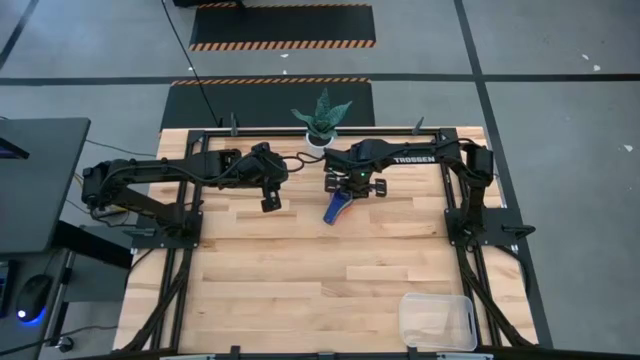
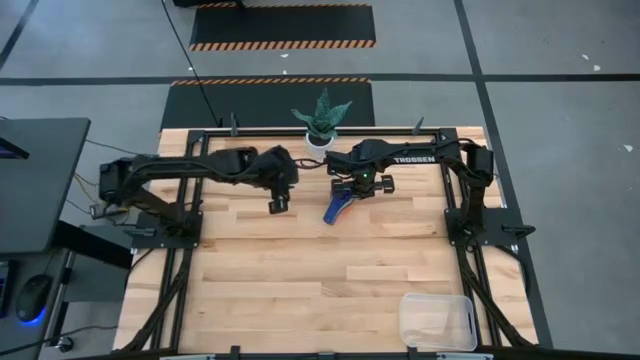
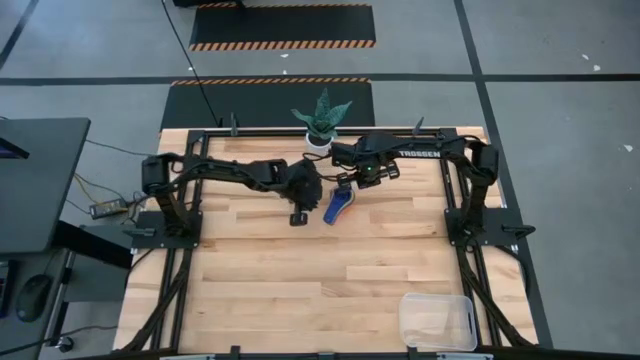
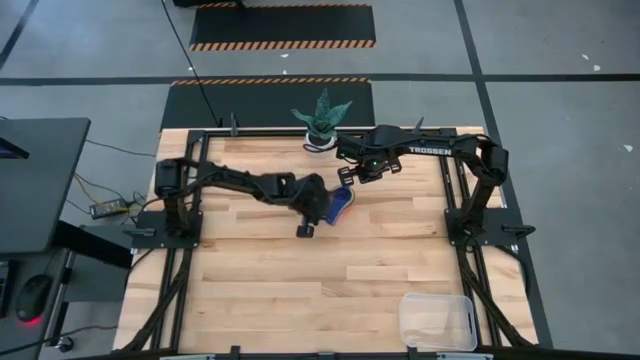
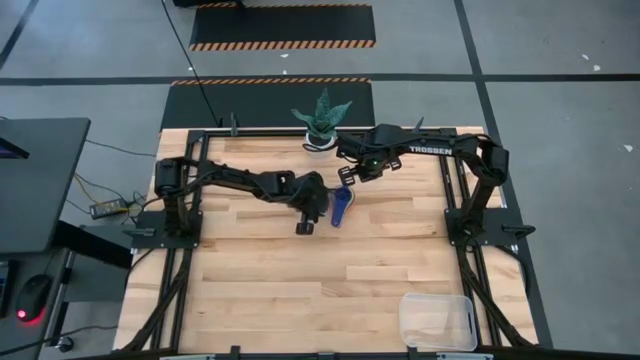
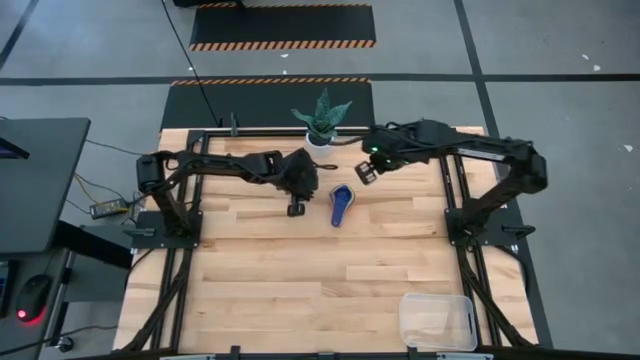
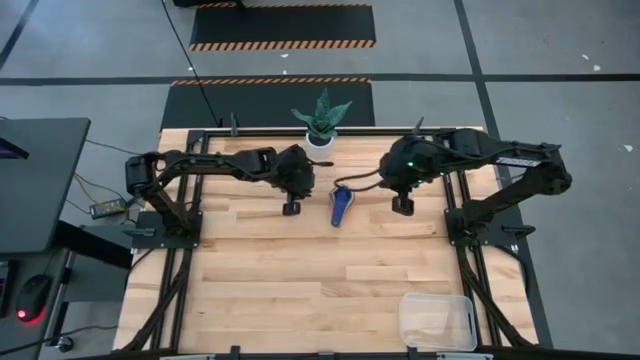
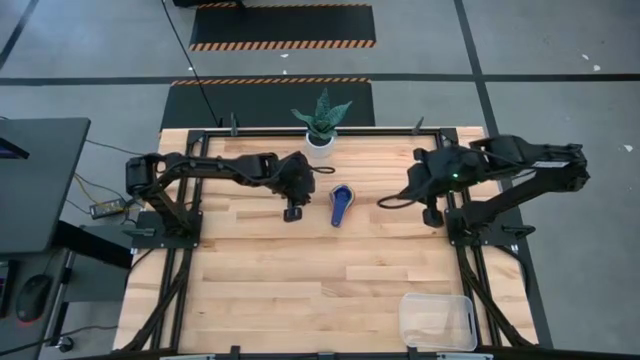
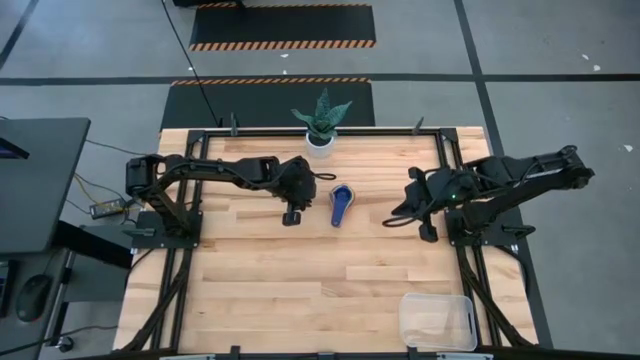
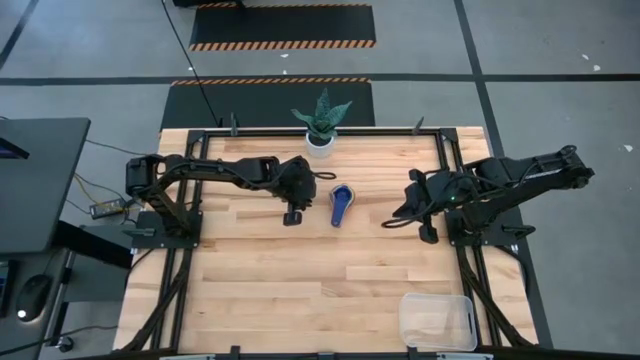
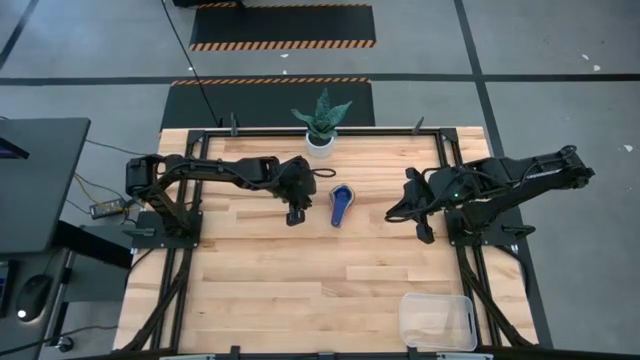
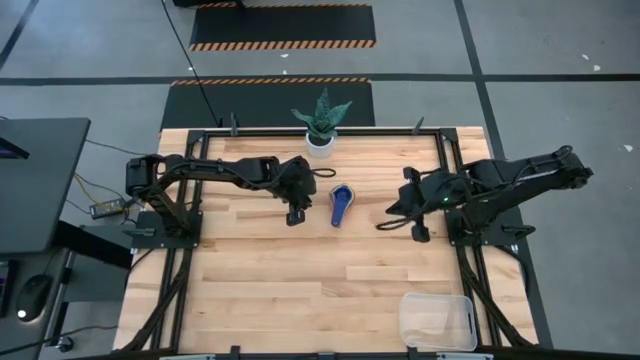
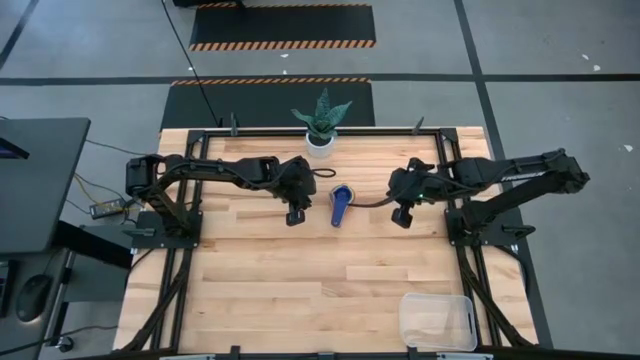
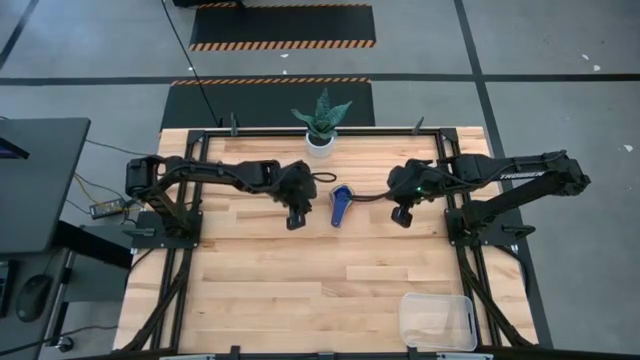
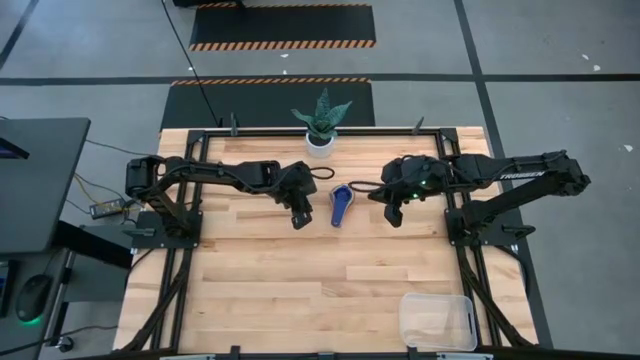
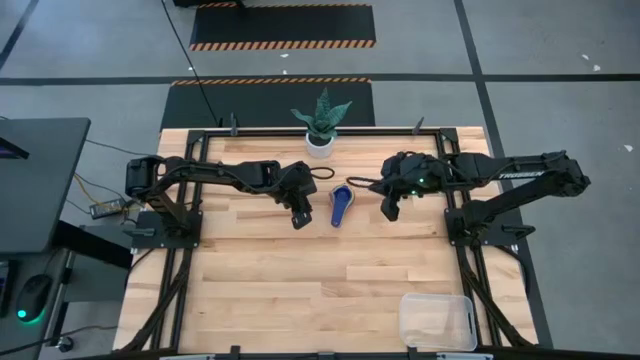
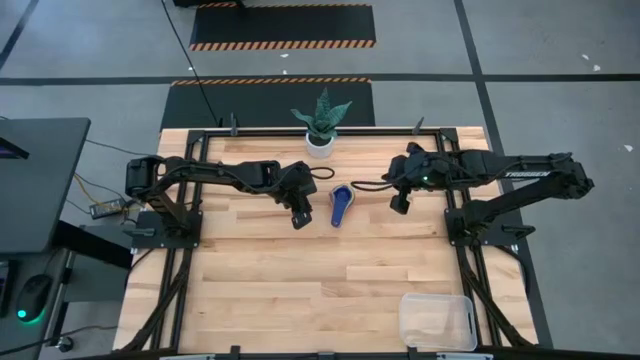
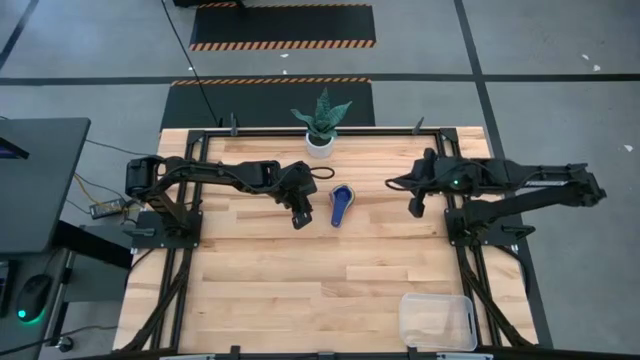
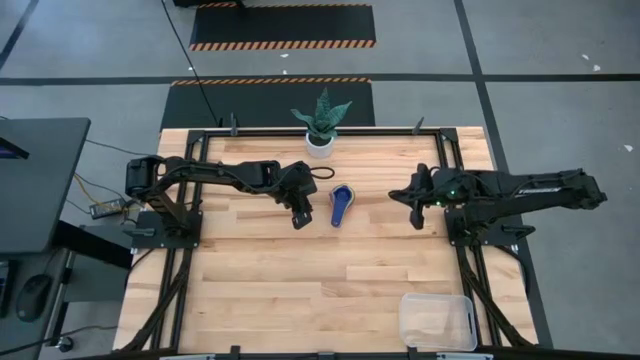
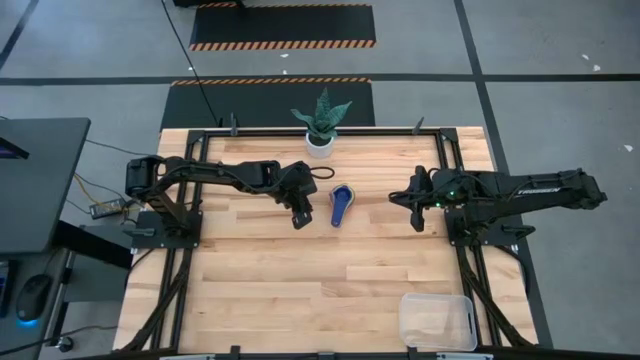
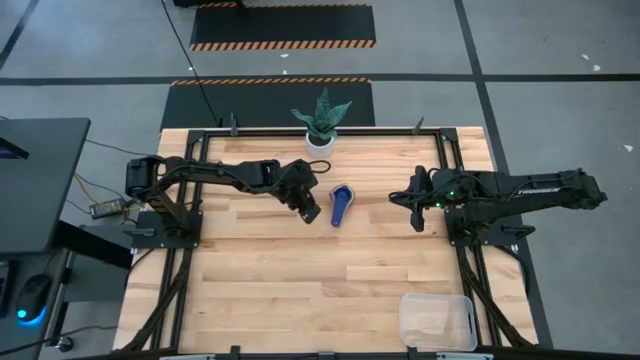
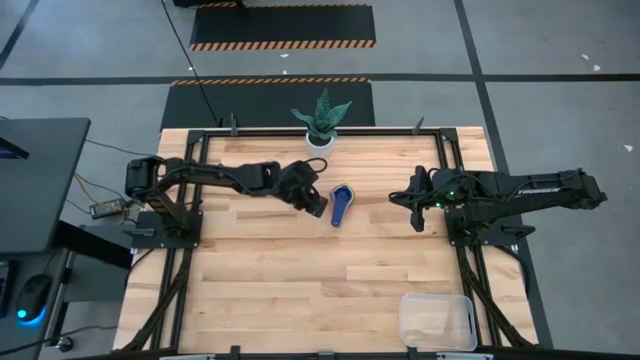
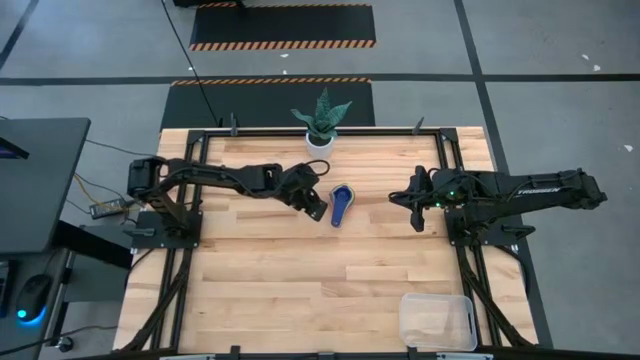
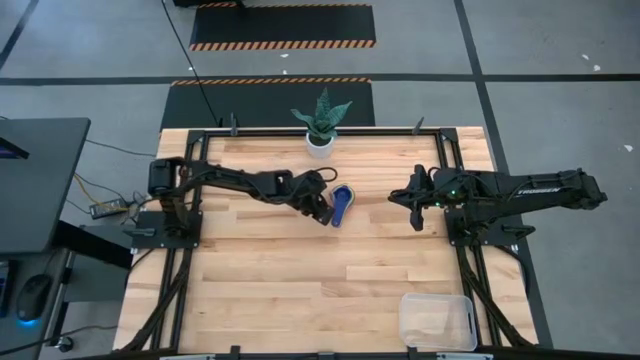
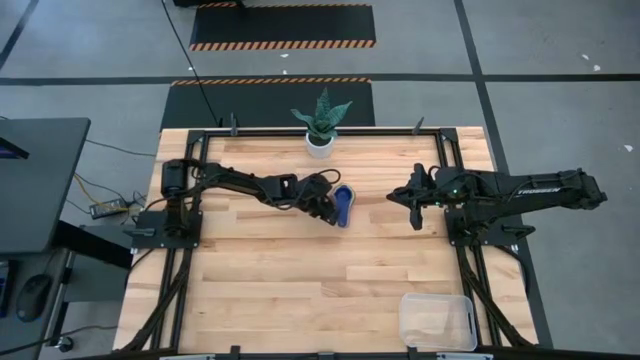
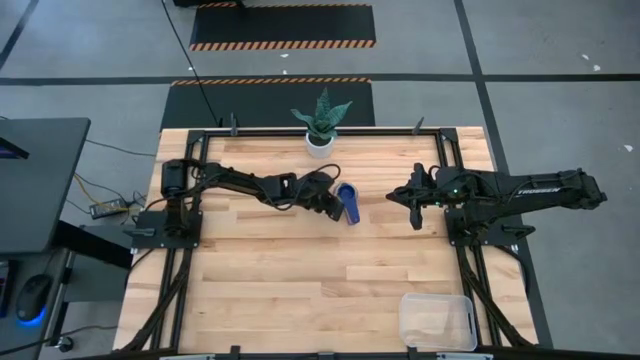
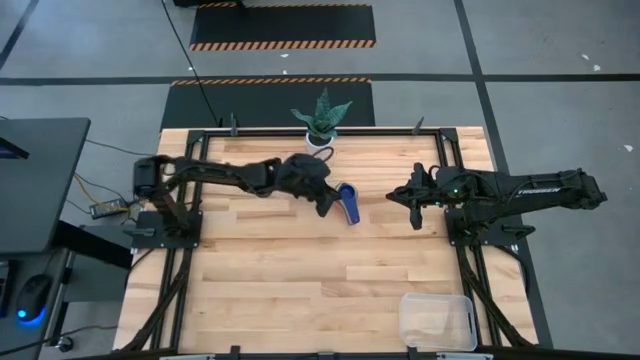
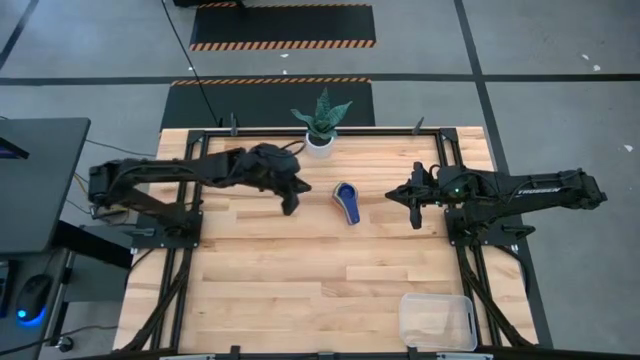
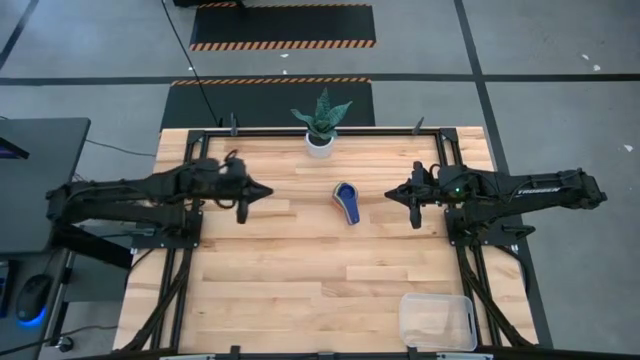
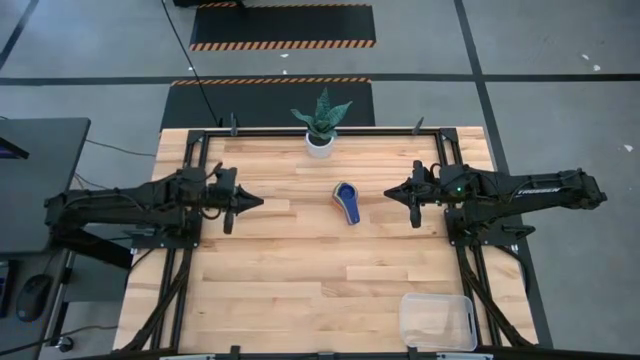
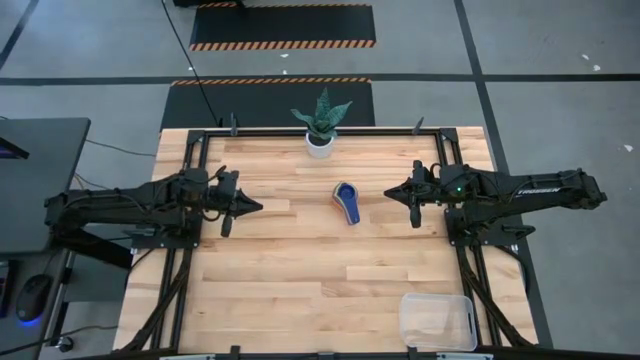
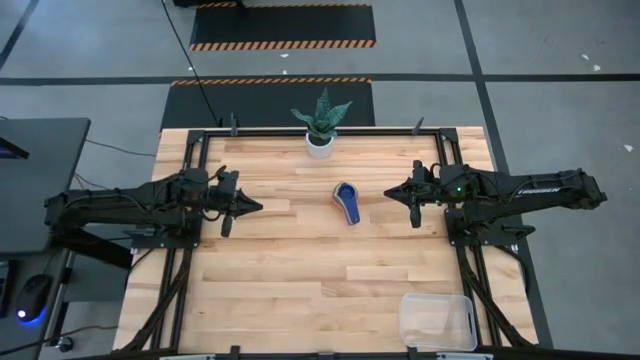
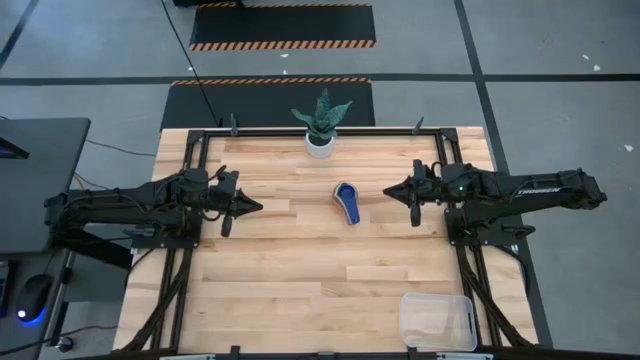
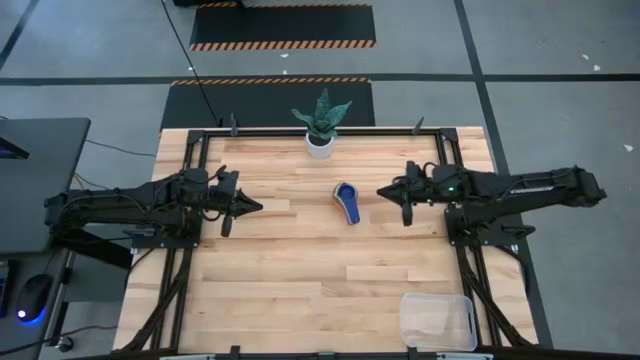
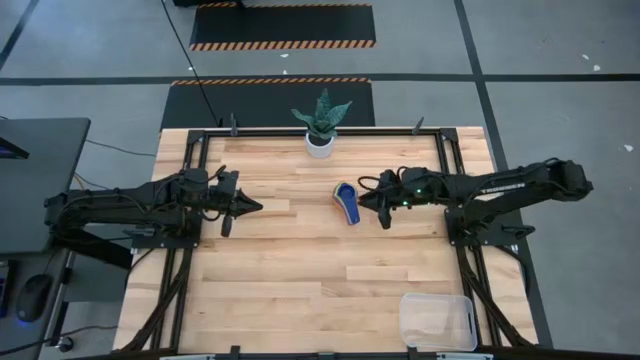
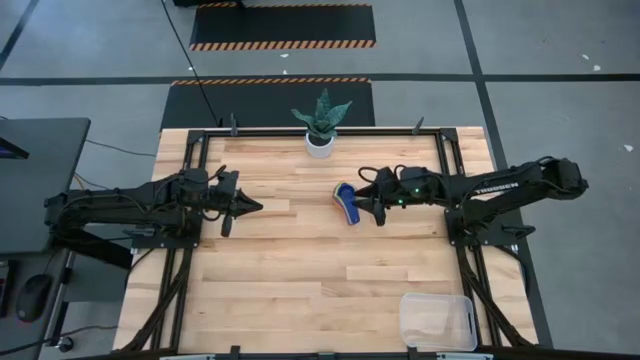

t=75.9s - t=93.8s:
Task: Nest measuring cups in basket
Put the nested measuring cups into the transparent bin
